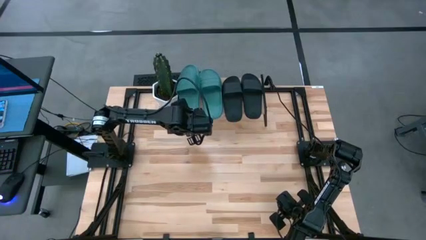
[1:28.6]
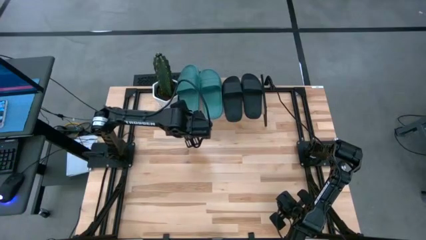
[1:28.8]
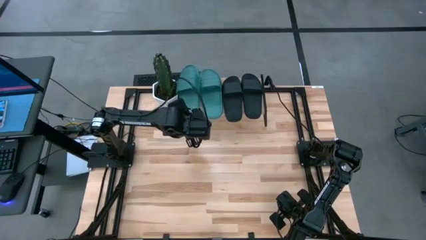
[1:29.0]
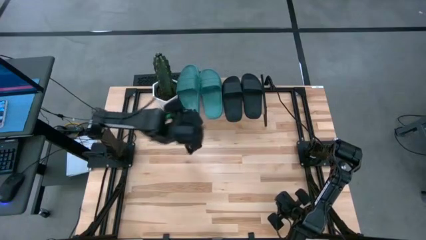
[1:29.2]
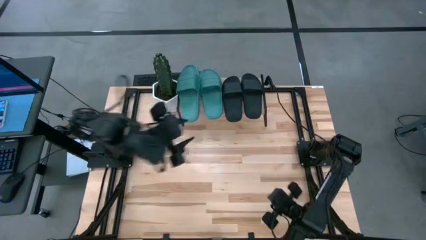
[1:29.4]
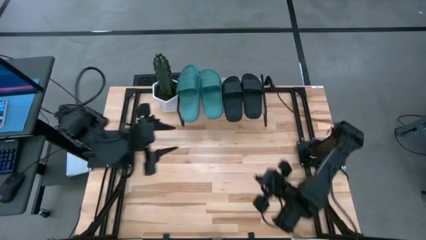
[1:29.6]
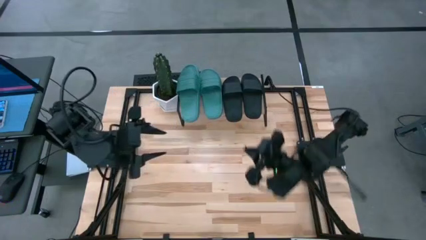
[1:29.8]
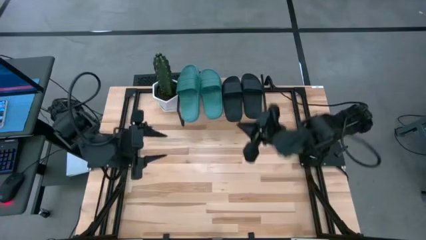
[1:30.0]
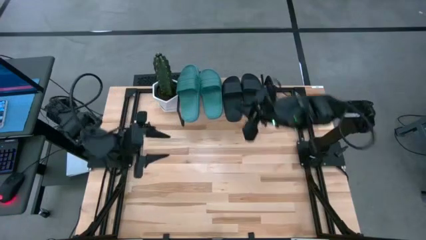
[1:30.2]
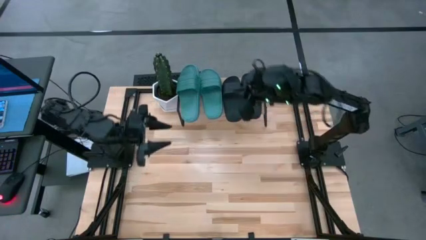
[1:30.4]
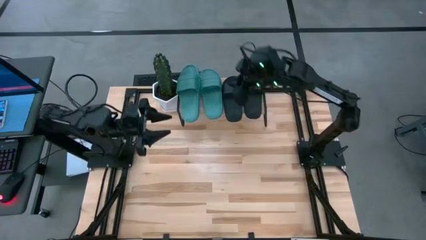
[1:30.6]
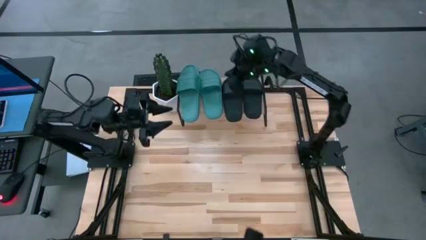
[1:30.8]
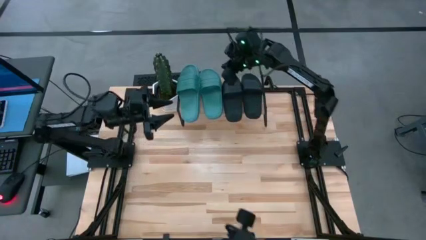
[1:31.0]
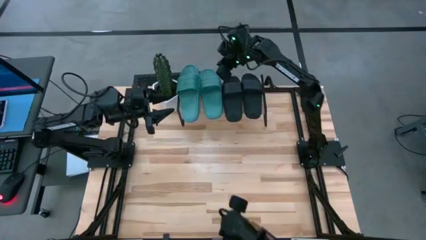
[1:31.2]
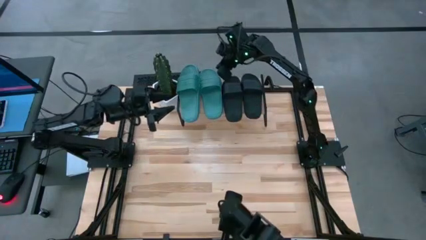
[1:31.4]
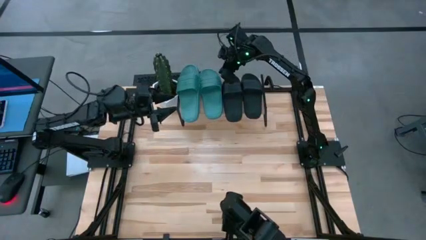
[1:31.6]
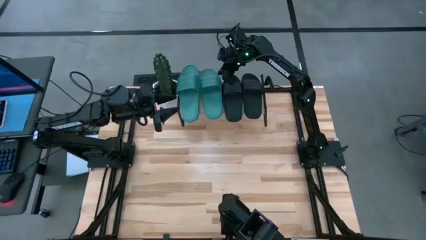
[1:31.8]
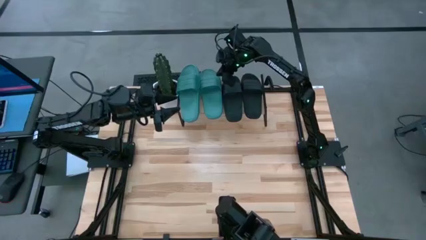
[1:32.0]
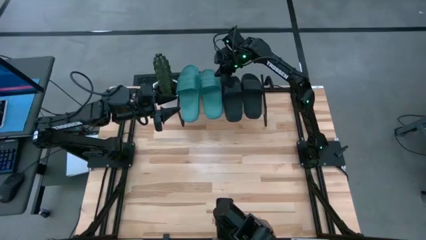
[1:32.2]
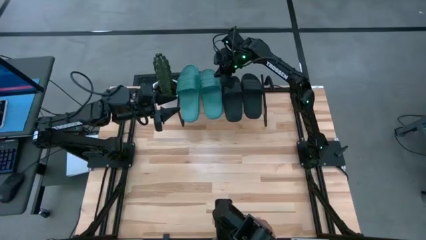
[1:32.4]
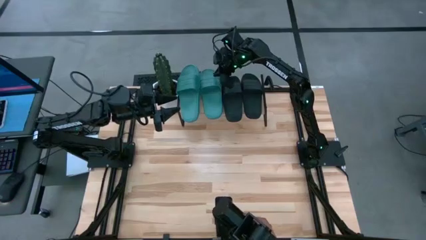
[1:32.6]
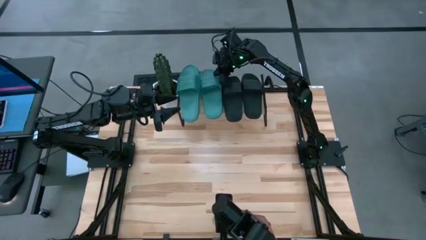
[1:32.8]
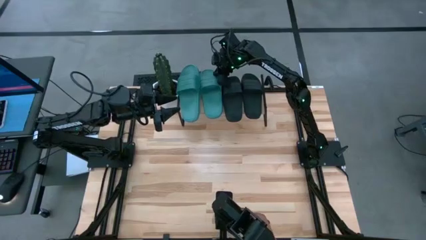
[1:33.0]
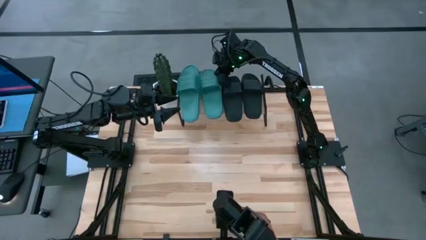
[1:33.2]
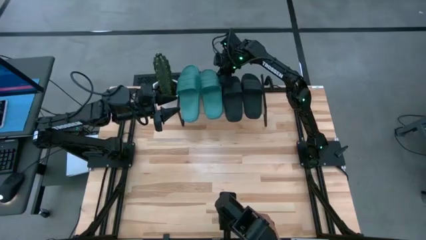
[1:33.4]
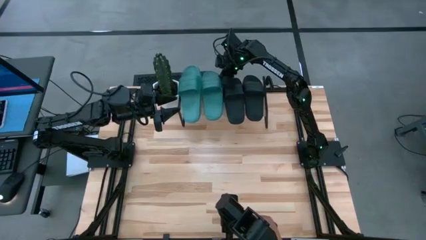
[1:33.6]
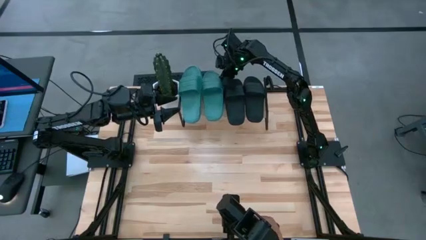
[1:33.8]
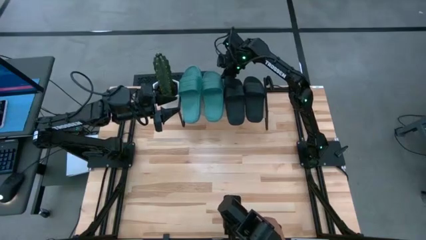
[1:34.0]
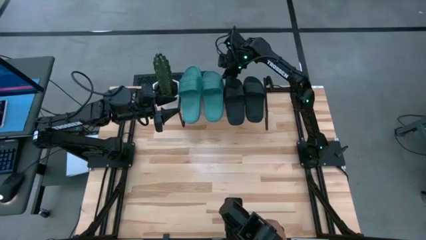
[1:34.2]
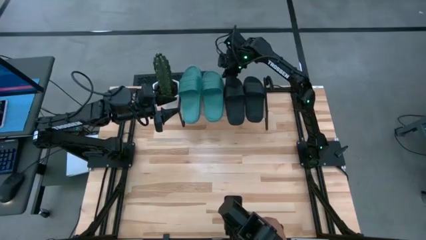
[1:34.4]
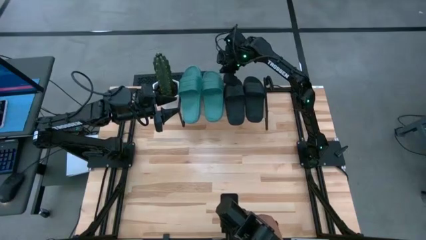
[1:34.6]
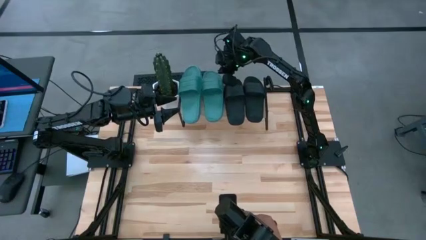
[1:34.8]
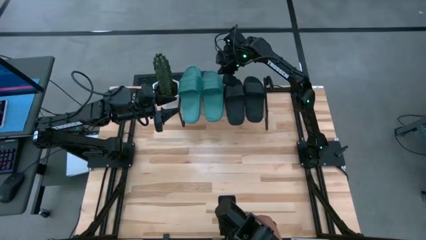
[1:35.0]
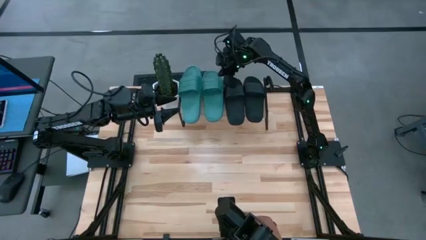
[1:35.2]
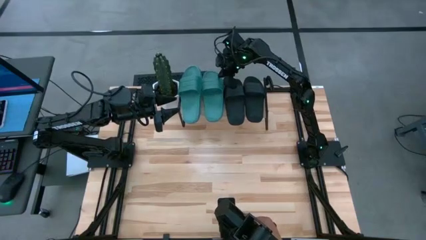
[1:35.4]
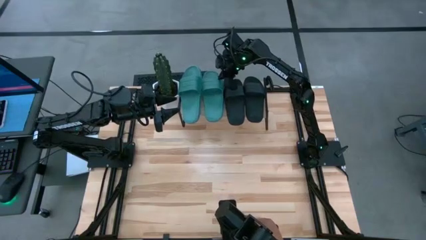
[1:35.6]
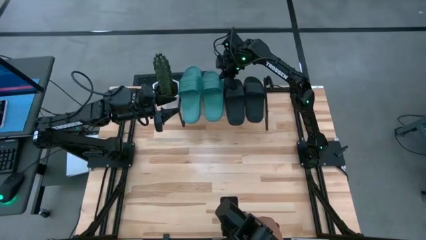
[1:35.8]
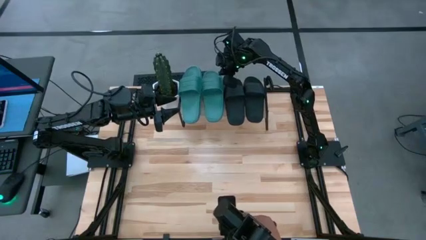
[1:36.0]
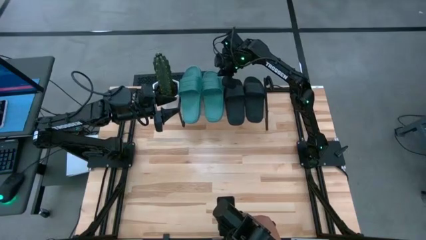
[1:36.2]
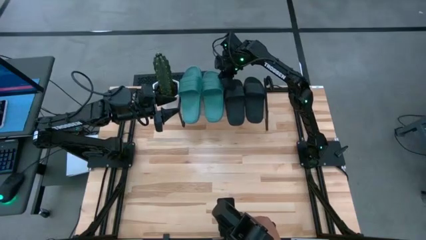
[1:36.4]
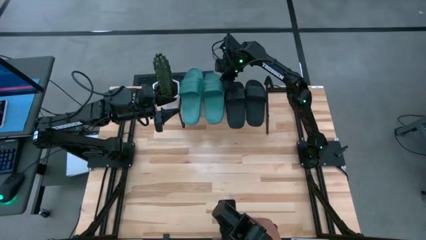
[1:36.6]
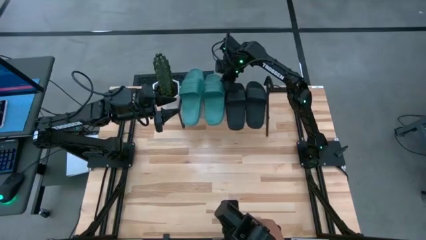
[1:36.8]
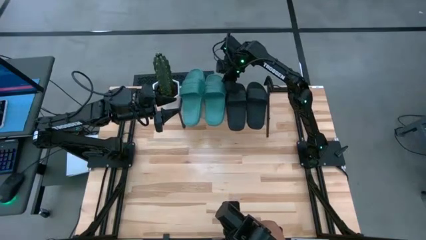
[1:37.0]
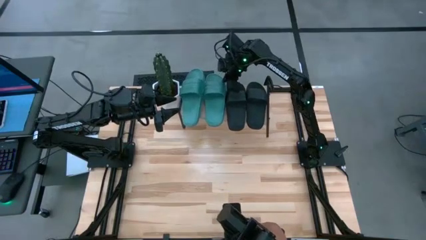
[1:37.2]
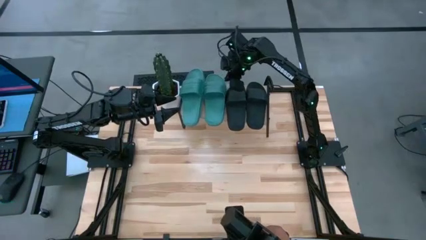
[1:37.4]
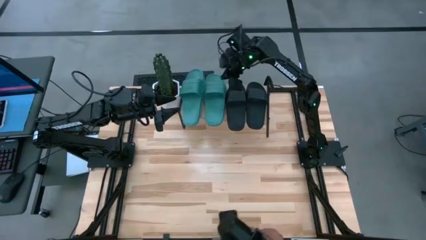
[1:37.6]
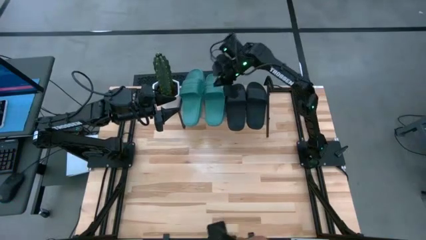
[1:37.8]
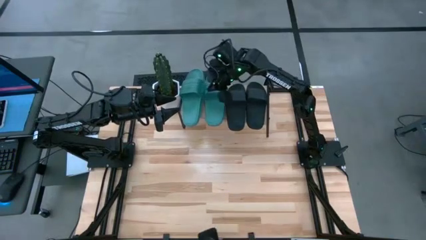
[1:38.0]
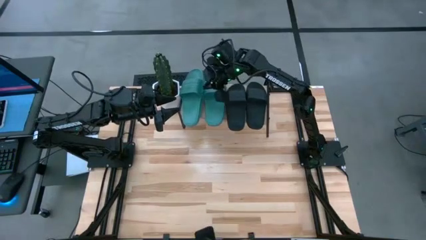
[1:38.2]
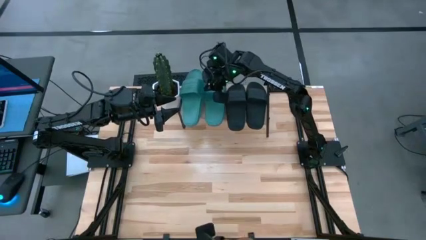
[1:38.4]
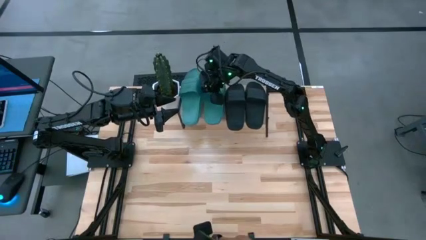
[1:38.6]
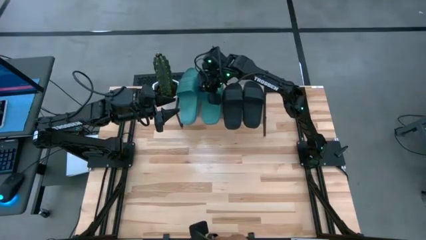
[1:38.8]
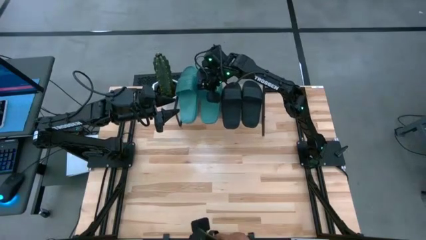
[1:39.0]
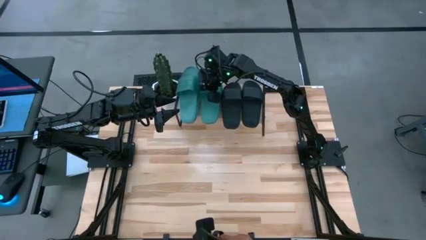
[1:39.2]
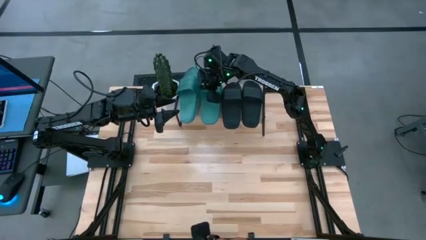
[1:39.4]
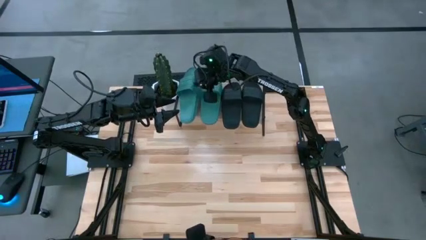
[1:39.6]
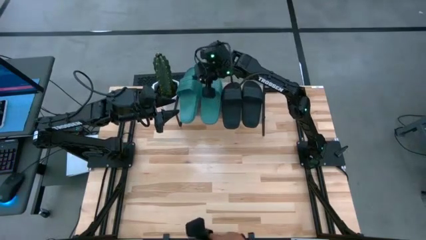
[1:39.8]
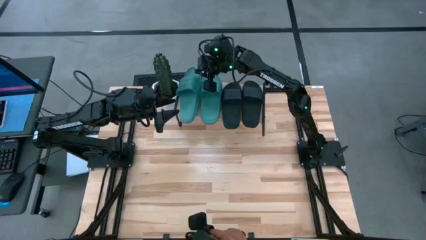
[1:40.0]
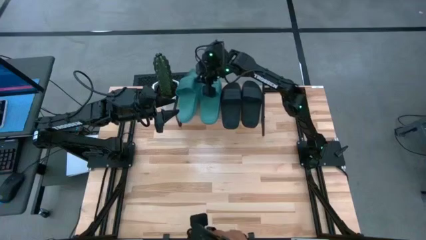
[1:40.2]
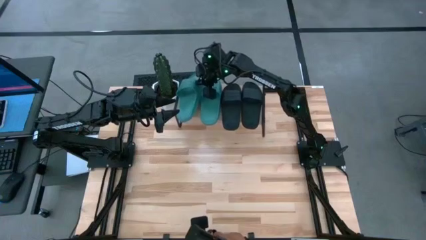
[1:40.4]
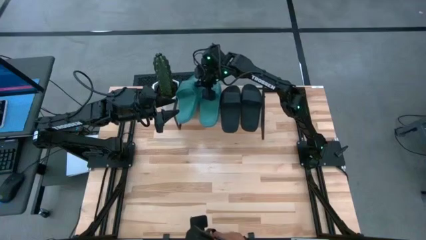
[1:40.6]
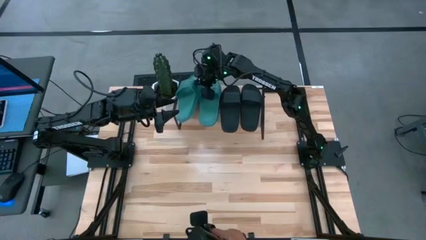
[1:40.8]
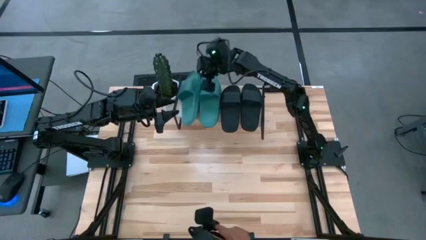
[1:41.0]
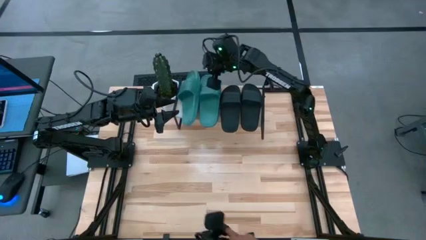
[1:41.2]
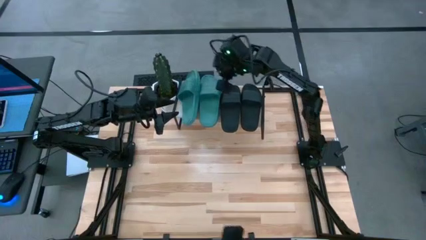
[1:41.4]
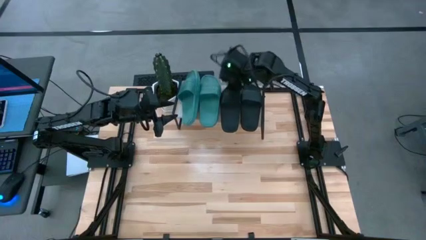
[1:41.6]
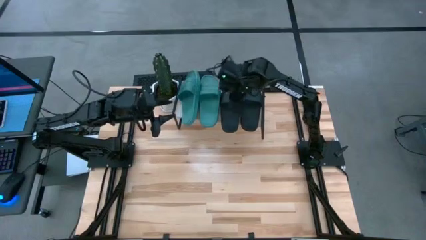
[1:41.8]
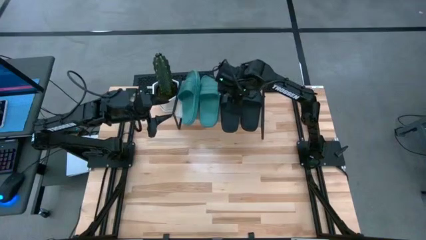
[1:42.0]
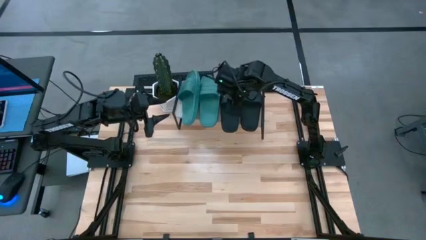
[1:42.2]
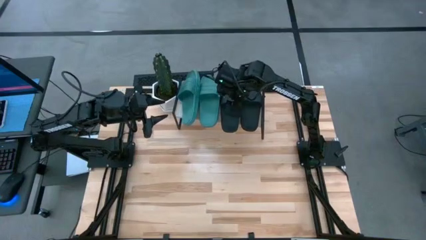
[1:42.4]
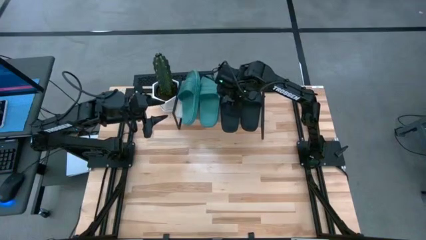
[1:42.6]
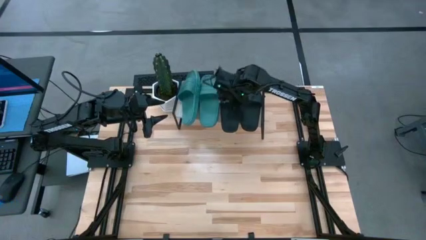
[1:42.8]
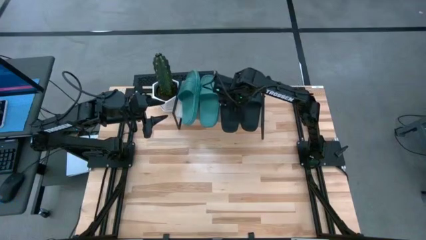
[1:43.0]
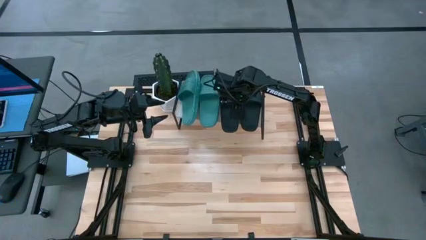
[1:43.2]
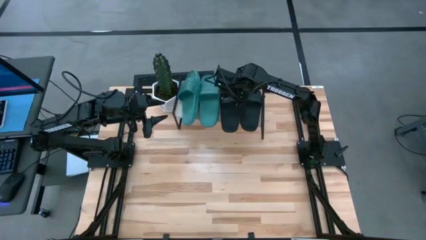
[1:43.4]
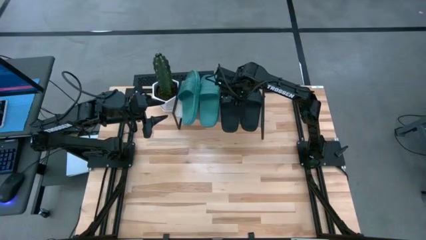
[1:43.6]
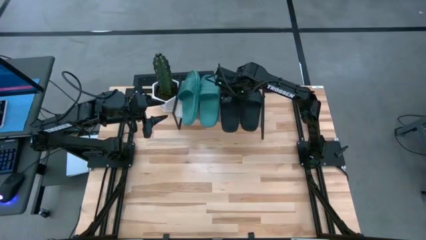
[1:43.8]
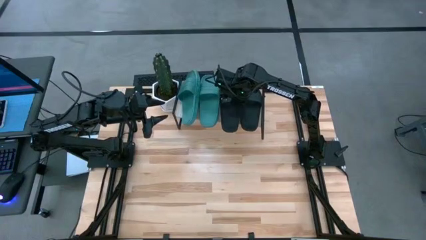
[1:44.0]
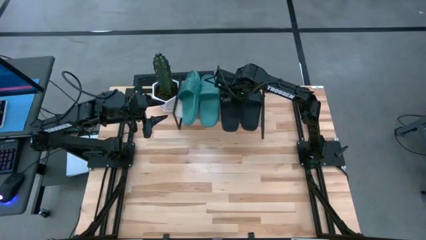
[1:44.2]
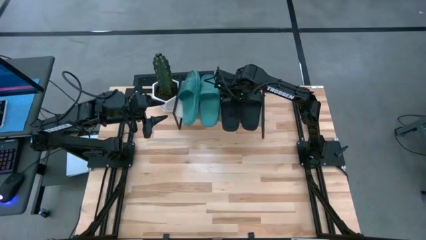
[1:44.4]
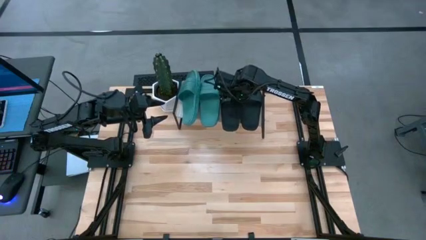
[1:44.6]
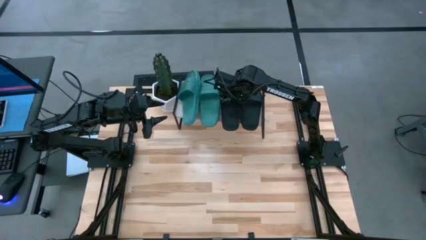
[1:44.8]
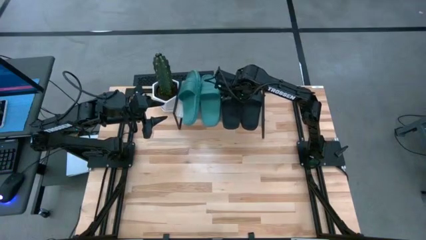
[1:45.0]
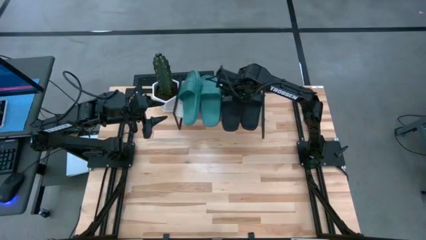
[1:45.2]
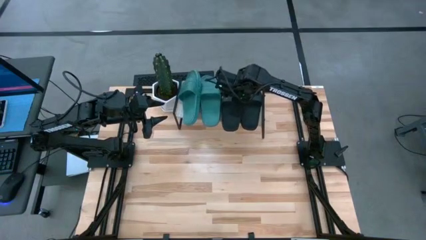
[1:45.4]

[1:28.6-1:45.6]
Task: Pick and place slides into the shelf
Adjust the slippers on the shelf
